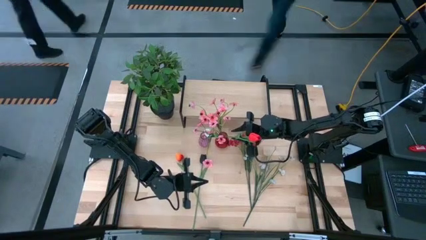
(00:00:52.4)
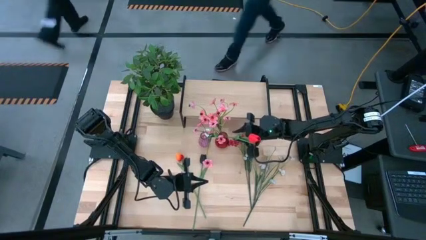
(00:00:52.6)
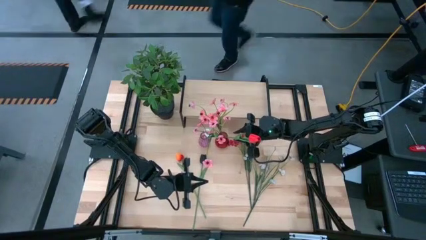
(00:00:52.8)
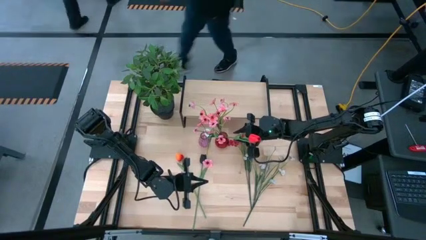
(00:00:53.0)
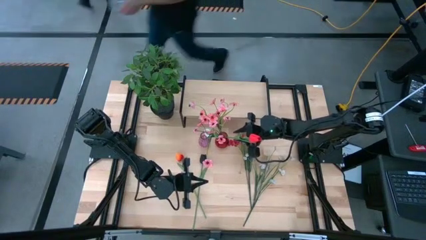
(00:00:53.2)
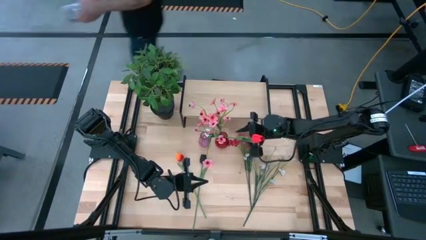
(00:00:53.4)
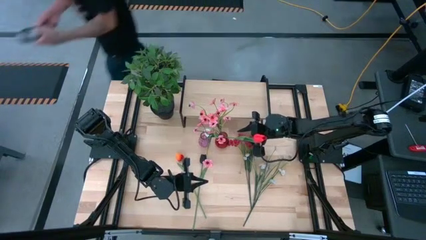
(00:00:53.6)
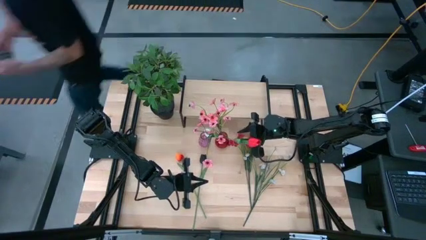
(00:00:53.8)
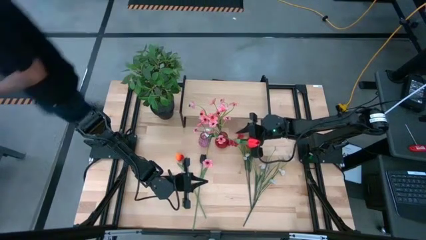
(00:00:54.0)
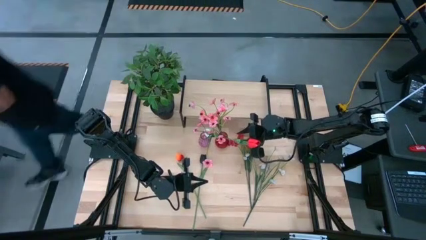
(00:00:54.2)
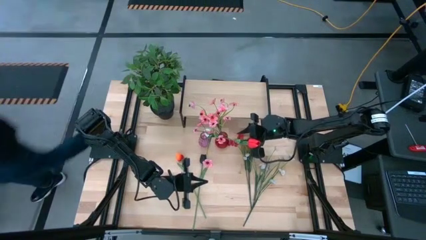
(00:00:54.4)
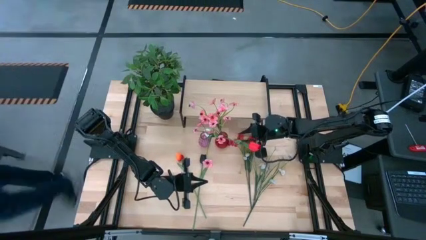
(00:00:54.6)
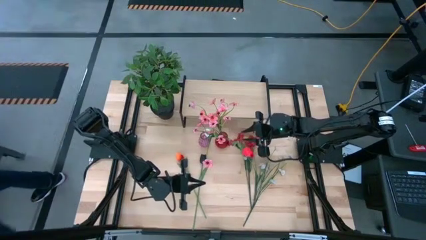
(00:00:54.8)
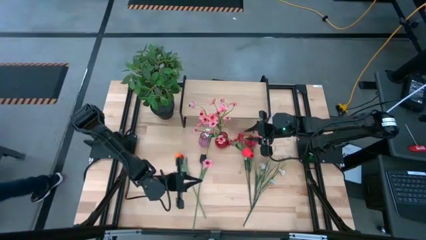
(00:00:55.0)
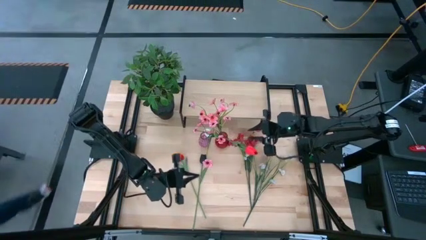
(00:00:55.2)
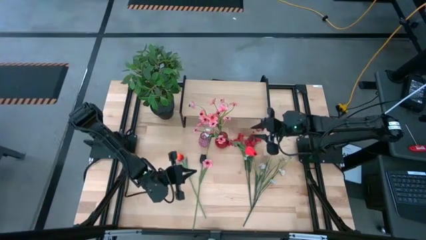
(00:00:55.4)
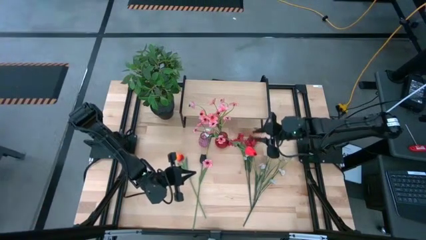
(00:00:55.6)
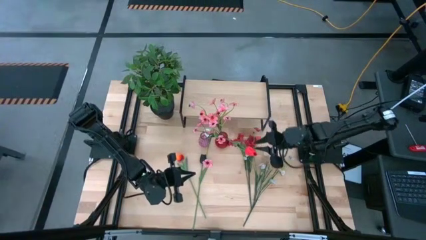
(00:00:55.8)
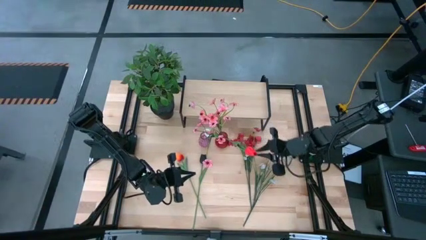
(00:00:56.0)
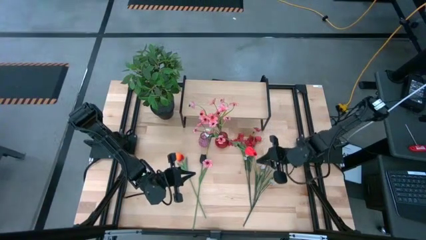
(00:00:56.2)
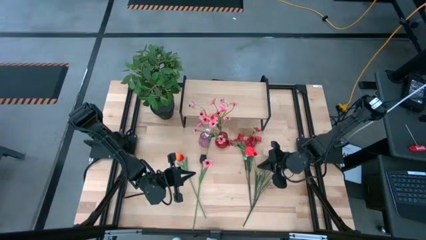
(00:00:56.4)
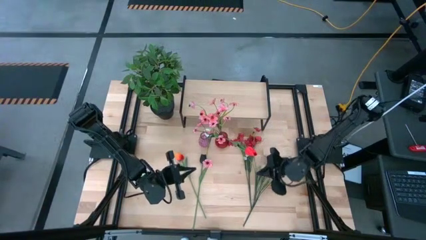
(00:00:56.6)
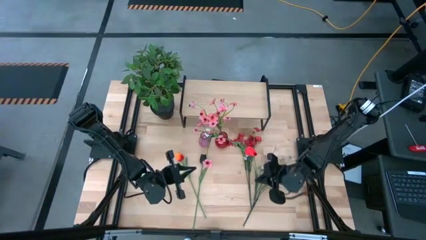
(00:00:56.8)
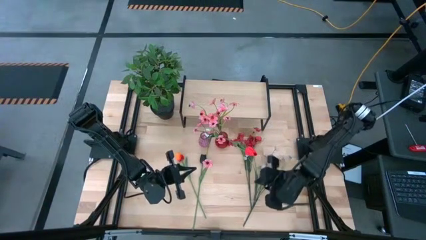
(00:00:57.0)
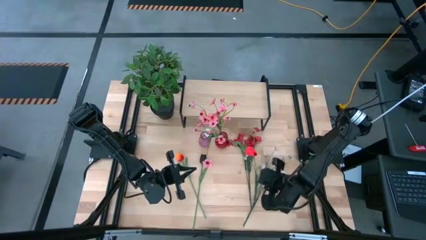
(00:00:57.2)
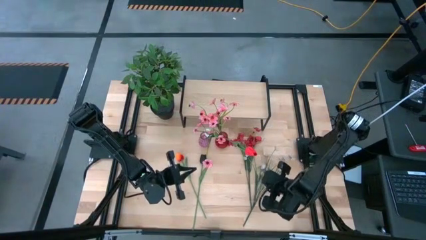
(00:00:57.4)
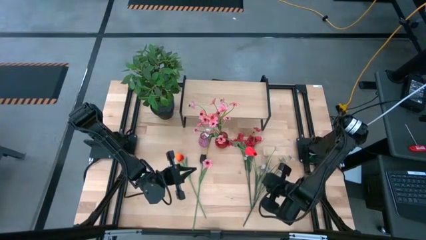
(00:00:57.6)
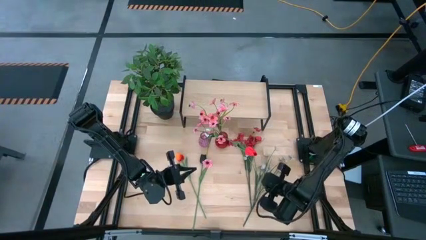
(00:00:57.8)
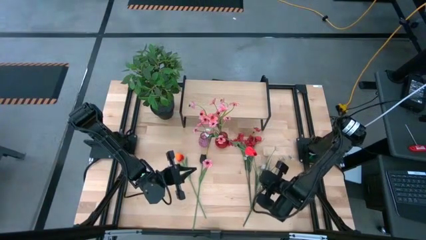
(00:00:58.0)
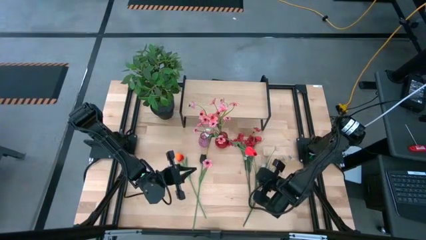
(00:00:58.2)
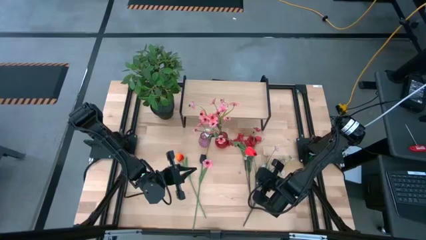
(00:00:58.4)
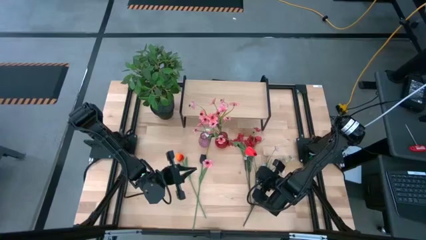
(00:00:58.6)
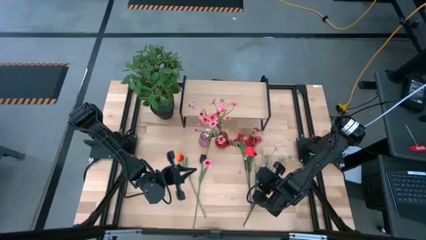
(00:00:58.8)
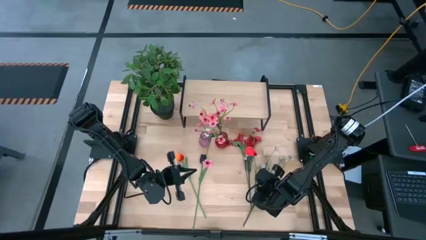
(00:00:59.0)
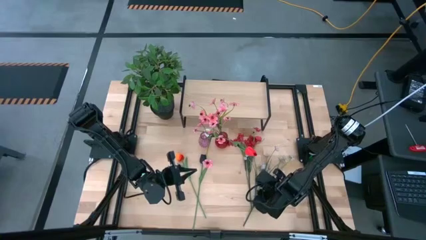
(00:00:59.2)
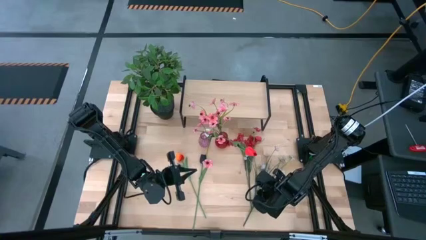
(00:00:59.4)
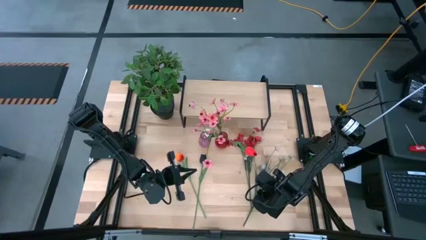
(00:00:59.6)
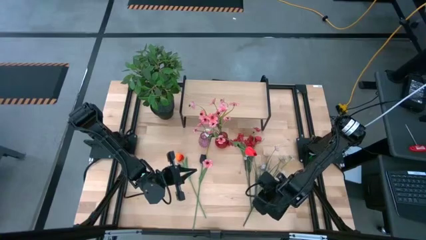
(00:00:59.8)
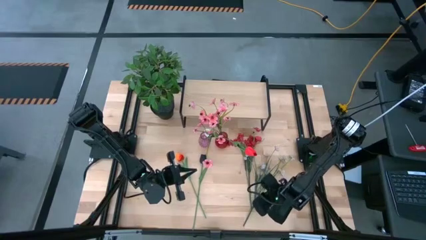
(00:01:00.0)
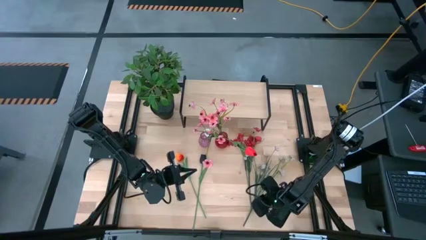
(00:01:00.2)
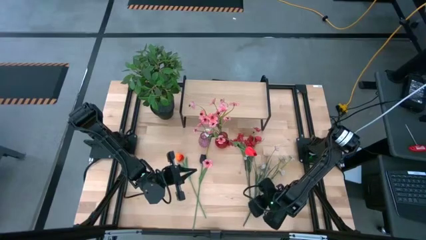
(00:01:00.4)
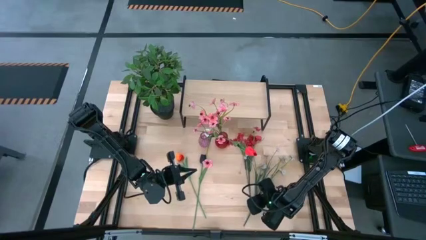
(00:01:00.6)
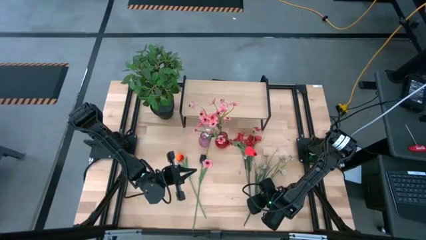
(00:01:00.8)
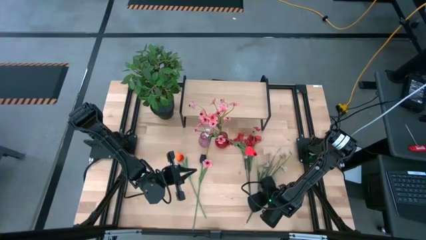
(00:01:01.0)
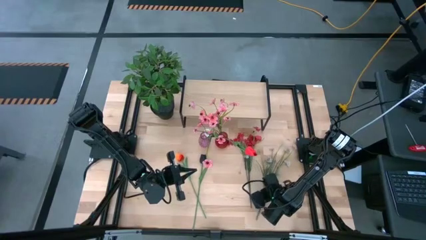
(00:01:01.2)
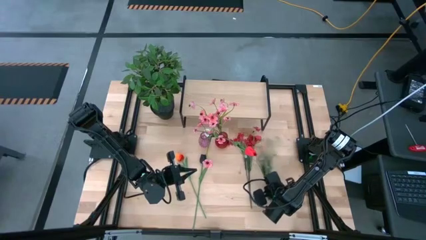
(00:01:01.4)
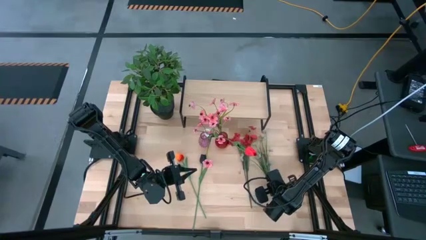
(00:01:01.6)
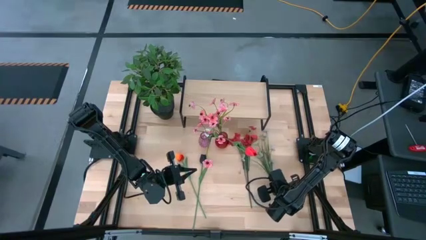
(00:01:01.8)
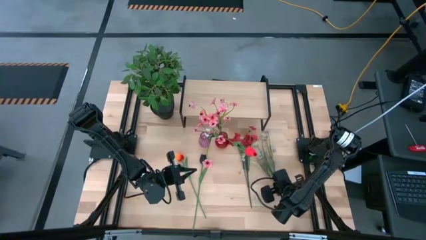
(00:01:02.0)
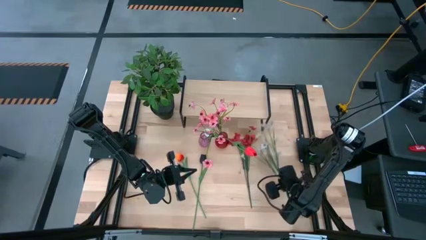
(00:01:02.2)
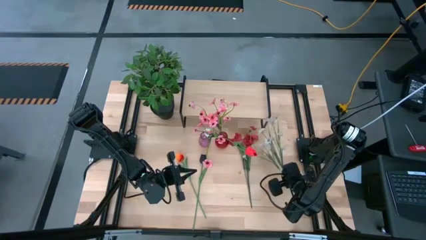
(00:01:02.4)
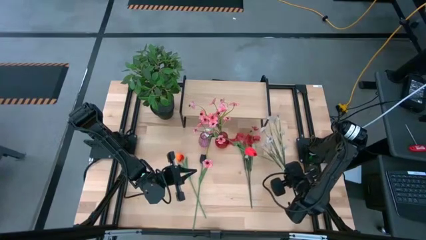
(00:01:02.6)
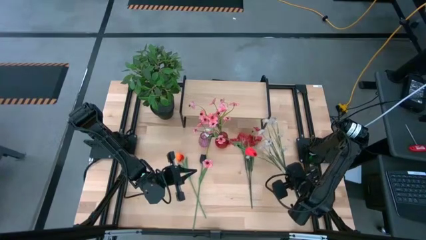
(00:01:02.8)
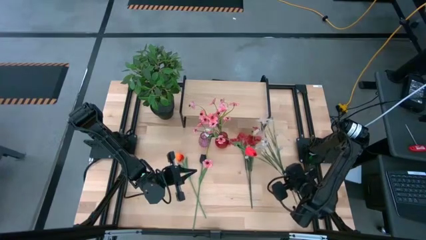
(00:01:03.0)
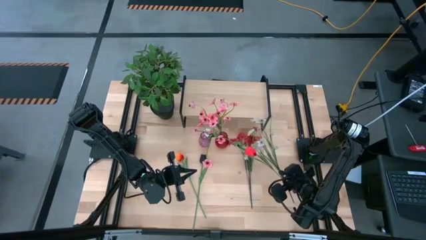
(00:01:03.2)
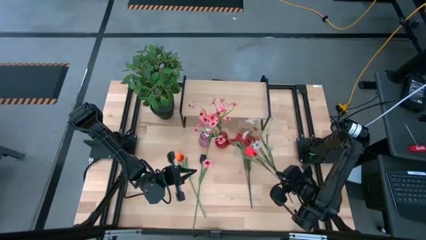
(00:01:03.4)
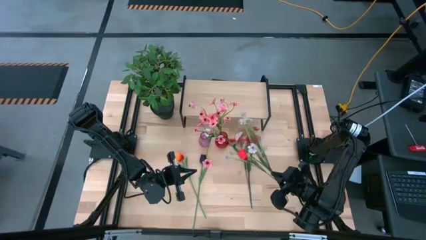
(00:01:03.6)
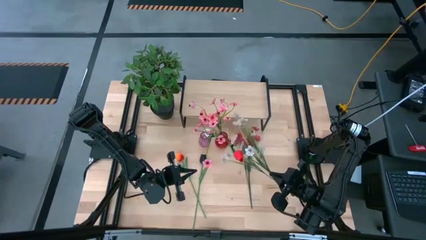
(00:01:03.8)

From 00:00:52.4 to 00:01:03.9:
Task: Pick and place flowers into a vace then onto a shelf
Put the white flowers into the purple vase

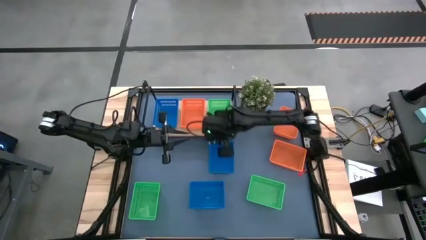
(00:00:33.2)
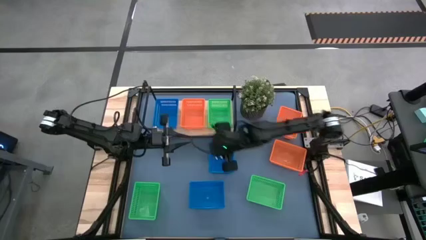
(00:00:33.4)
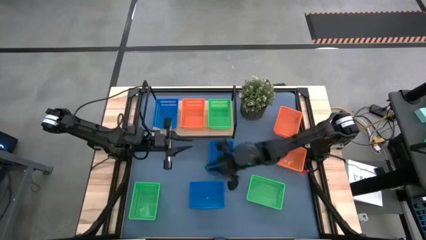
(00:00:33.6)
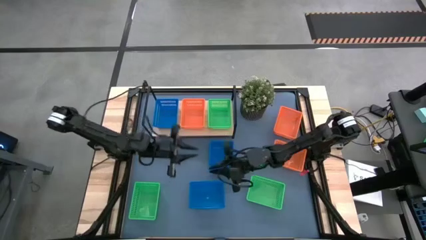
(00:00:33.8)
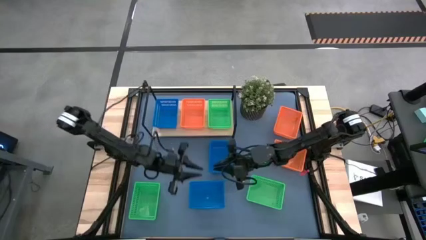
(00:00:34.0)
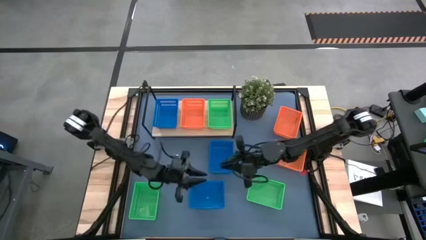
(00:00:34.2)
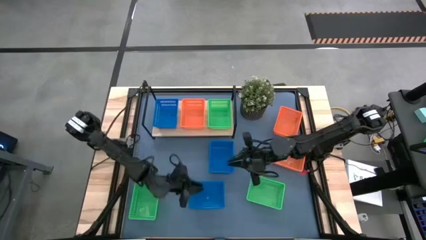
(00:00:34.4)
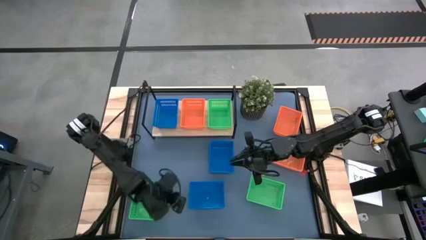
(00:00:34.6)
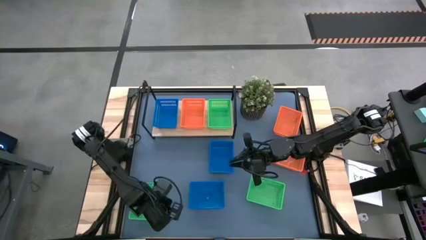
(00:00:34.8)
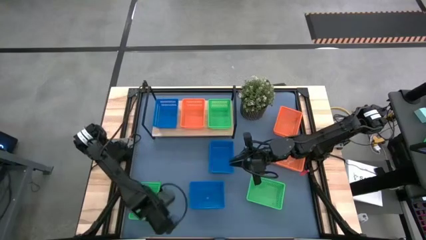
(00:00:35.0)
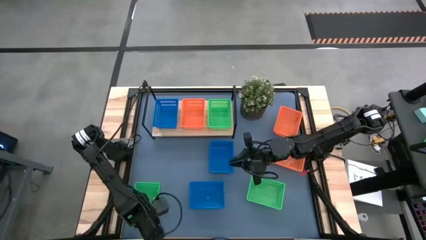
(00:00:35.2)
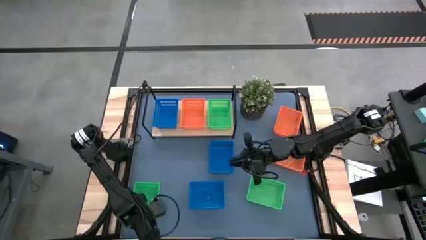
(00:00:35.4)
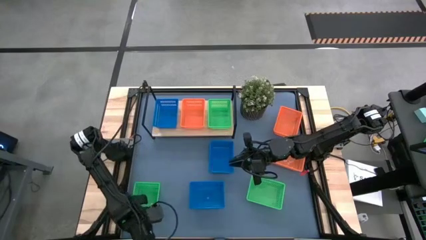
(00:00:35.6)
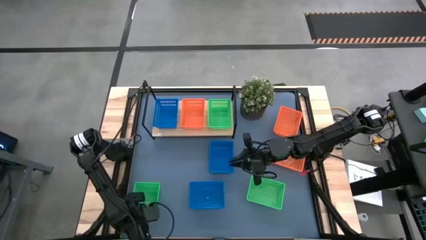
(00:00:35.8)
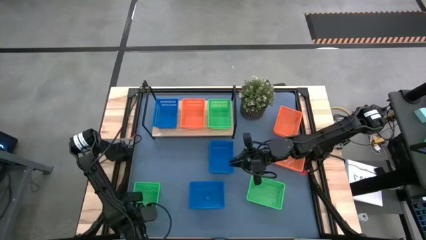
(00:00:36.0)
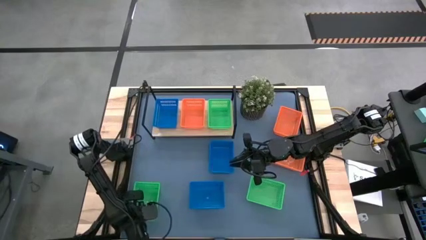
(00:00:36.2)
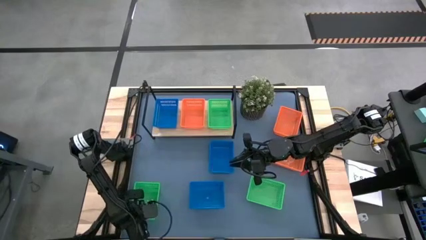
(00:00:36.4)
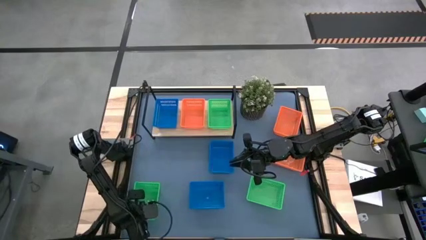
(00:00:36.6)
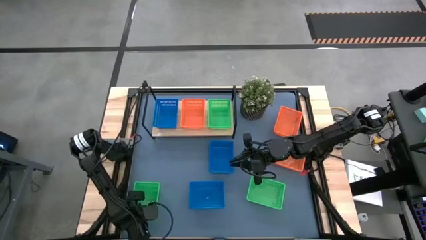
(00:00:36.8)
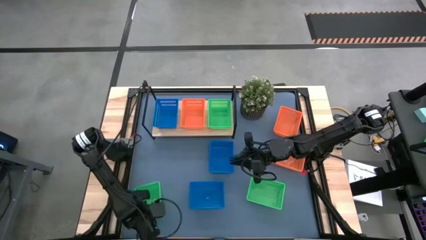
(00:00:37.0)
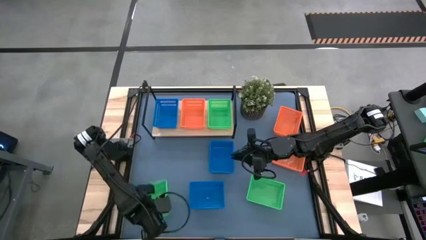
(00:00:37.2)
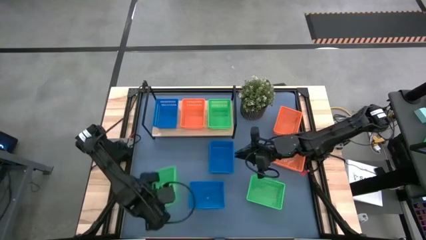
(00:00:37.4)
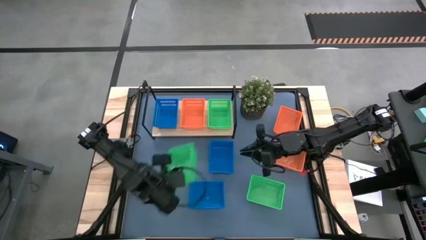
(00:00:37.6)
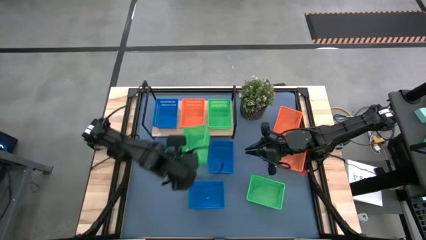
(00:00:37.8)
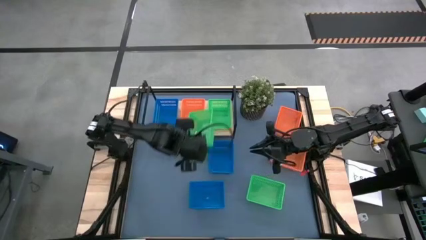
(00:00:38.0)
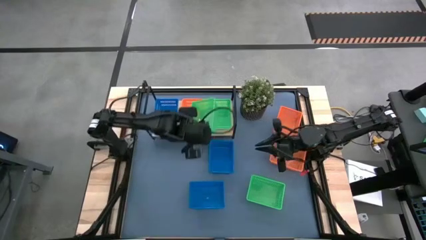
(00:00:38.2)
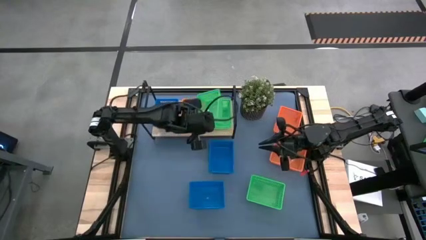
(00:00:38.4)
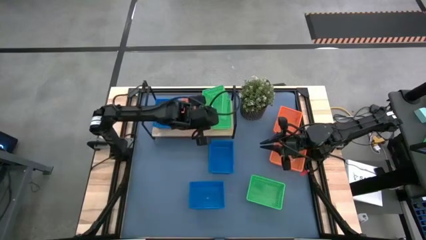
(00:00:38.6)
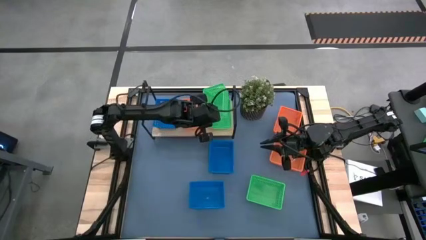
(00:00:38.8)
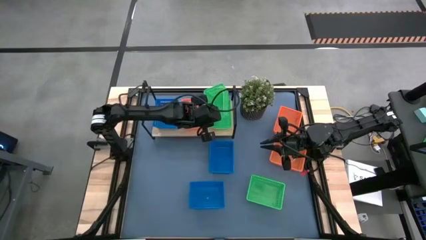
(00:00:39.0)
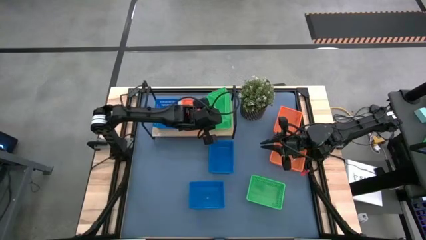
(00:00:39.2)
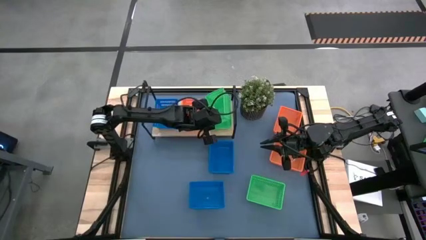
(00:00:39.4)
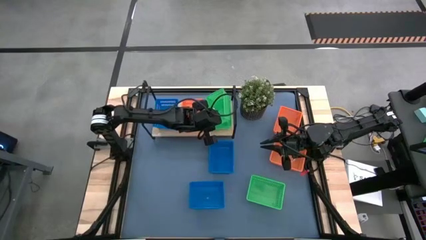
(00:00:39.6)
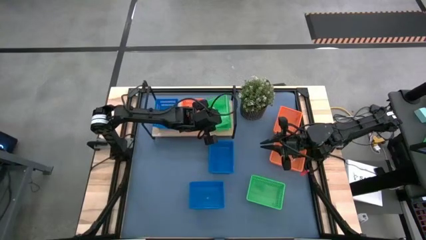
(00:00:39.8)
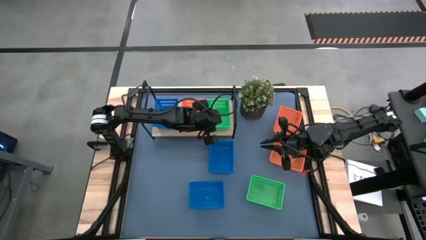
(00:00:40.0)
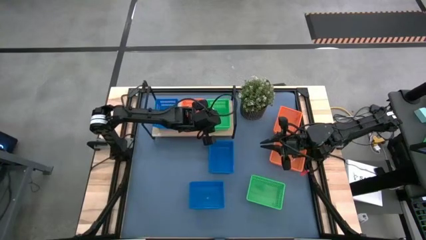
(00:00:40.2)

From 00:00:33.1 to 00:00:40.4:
Task: Stack baskets on shelf by color
Stack the left green bin on top of the green bin on the shelf
